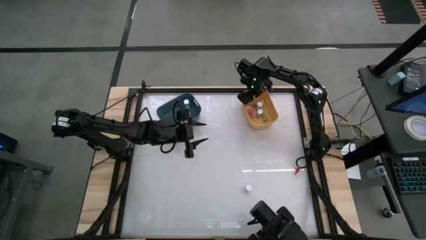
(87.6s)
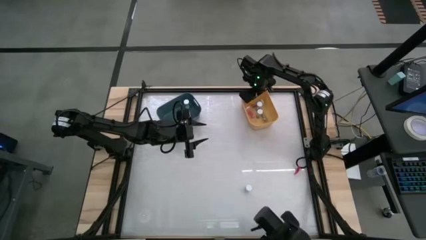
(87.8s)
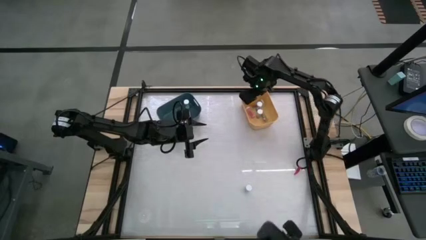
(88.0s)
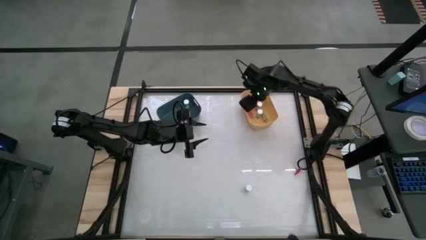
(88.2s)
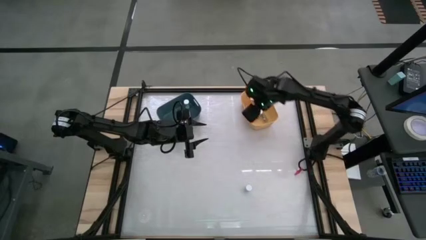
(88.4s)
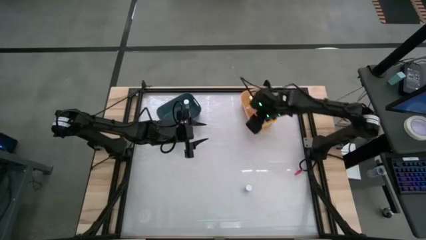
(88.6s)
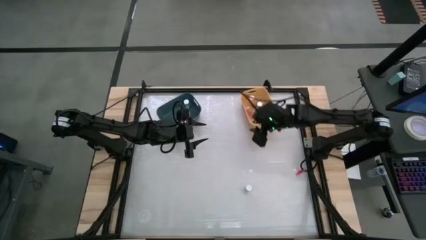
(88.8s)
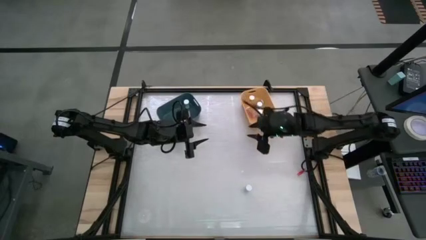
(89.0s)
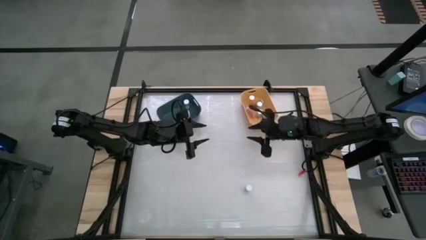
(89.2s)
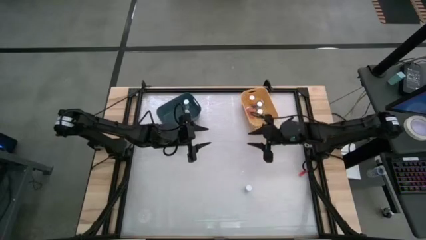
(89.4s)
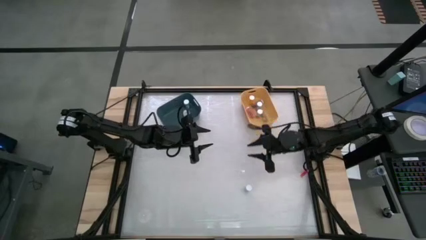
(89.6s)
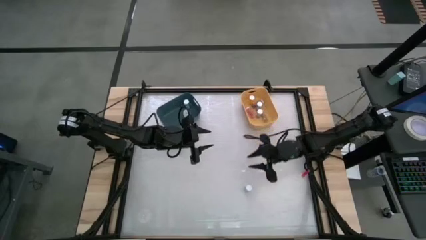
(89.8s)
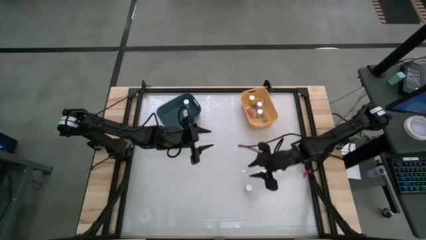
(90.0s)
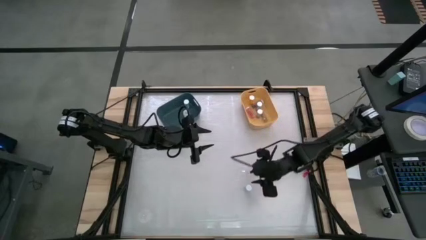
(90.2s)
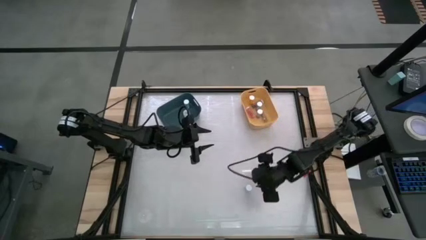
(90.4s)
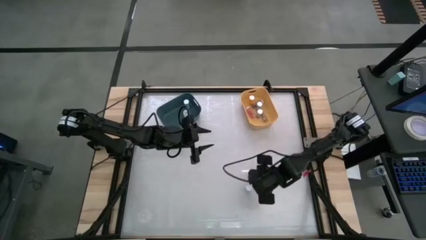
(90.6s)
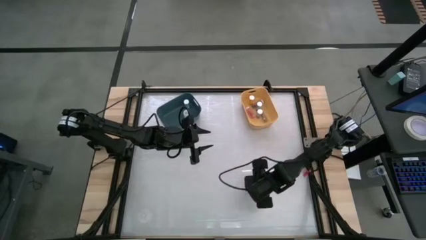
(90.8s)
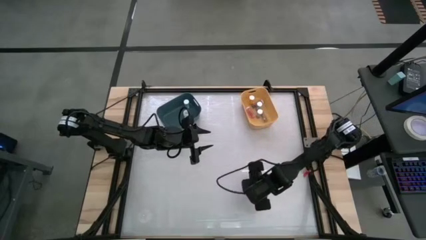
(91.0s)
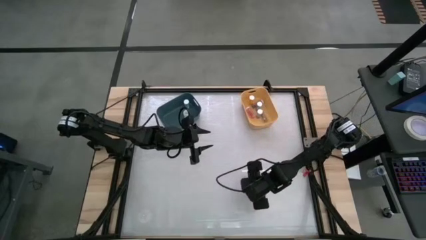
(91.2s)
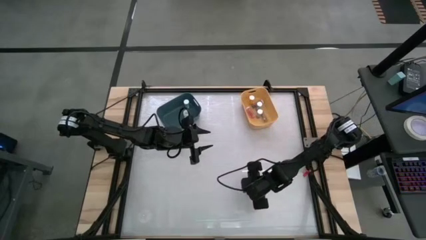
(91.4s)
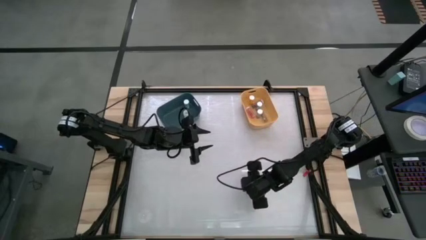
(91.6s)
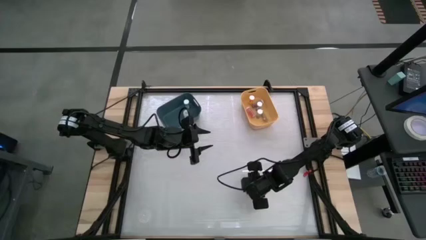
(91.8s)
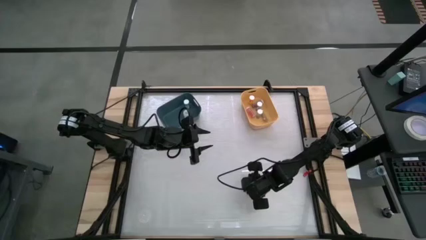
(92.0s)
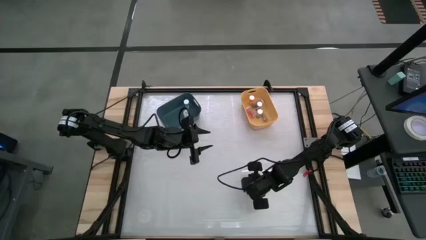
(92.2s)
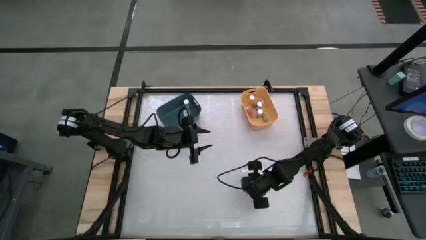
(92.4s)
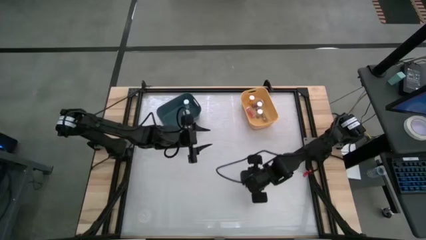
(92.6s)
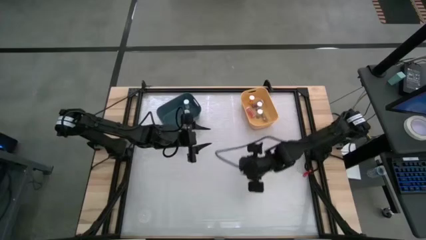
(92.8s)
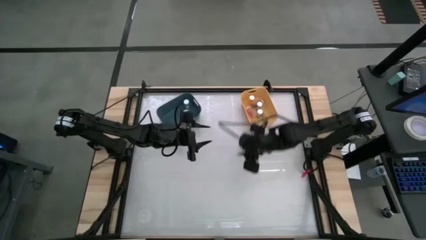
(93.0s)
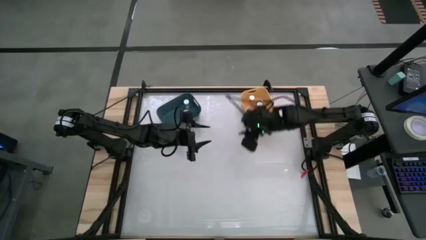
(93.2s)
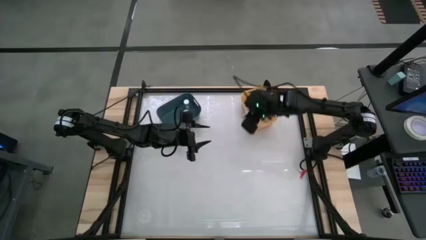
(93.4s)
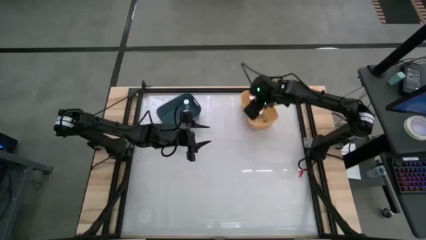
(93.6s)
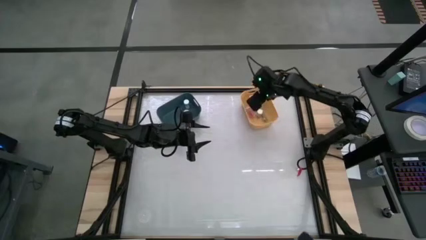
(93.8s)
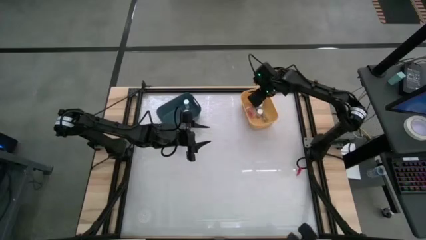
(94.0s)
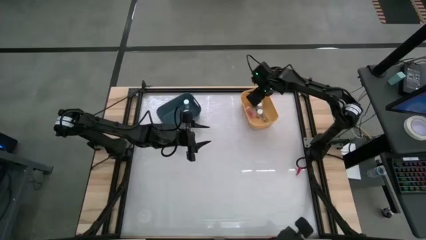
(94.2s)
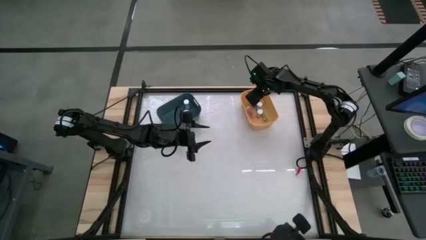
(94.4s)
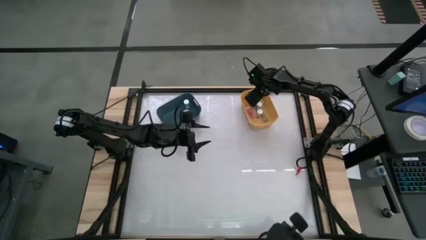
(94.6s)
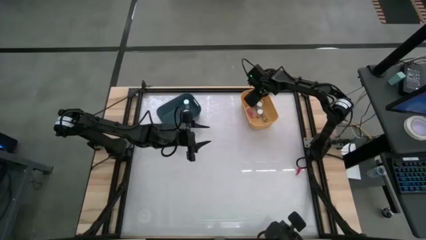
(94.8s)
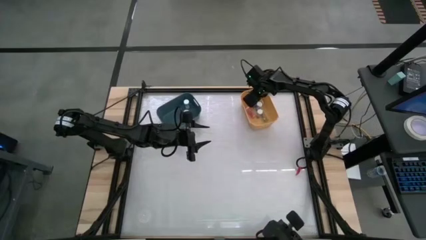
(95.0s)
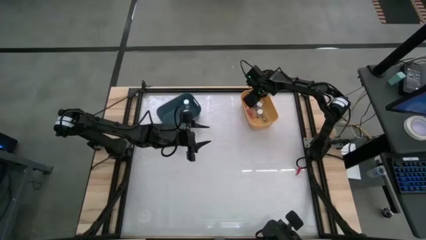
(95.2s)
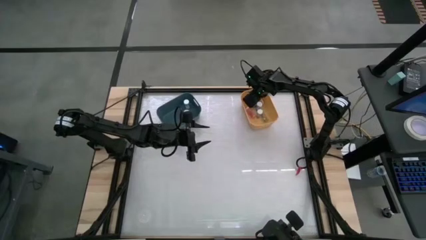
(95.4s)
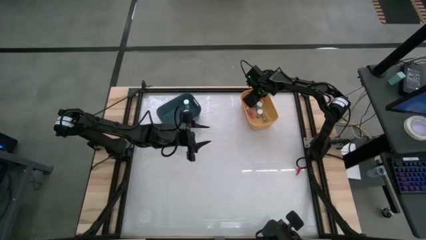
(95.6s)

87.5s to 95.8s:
Task: Pick and place medicine bottles into bin by pill shape (circle, oval)
Put the blue capsule bottle into the yellow bin

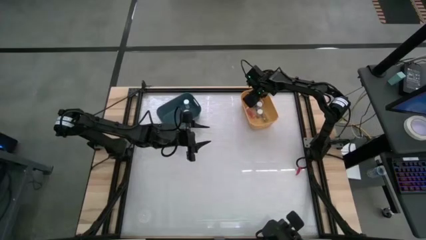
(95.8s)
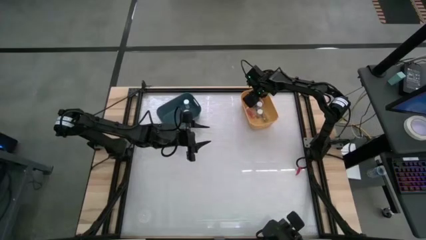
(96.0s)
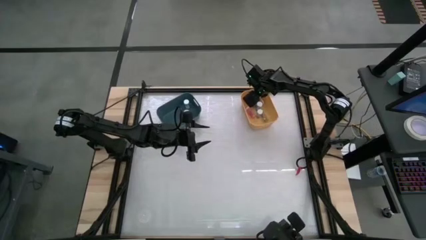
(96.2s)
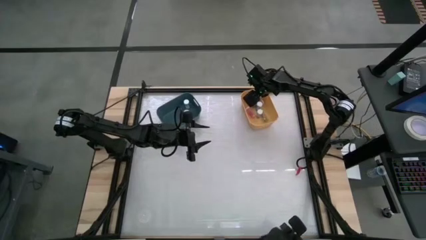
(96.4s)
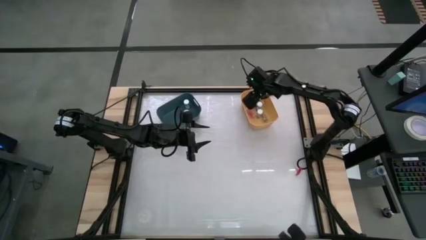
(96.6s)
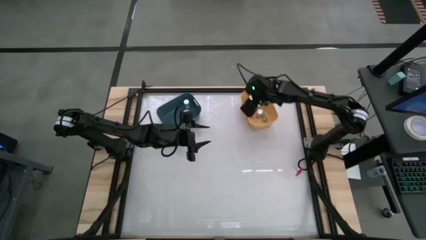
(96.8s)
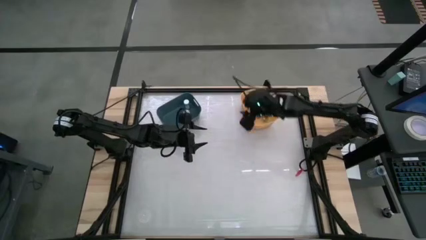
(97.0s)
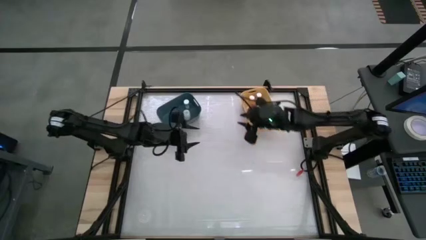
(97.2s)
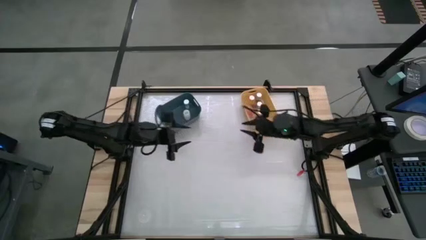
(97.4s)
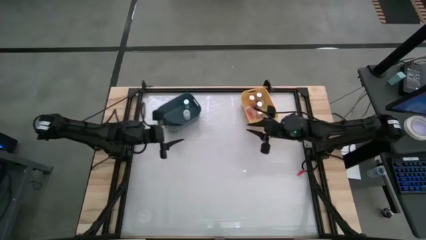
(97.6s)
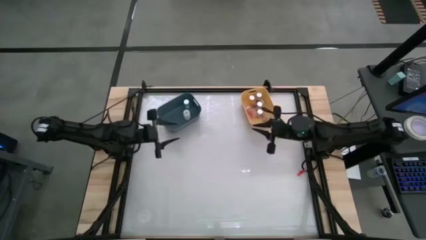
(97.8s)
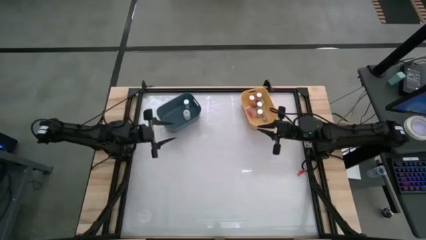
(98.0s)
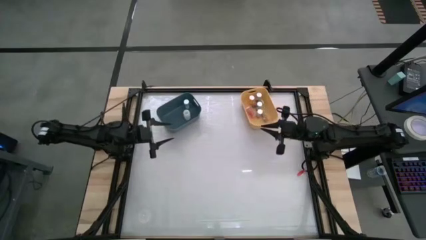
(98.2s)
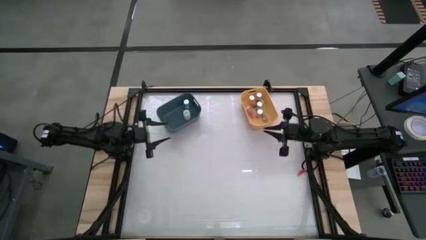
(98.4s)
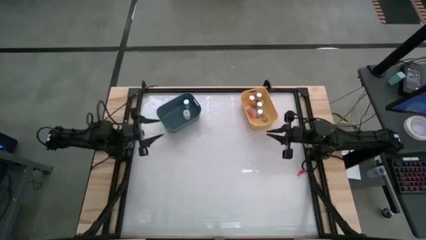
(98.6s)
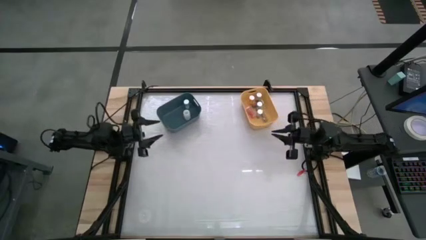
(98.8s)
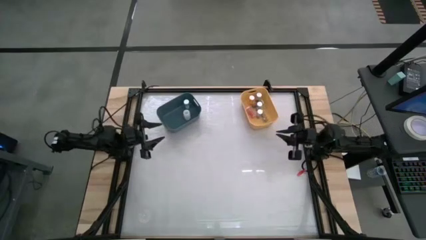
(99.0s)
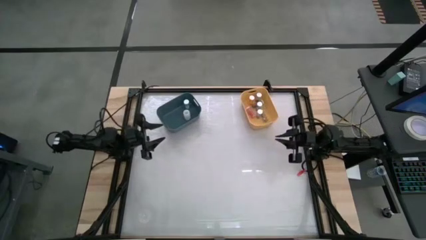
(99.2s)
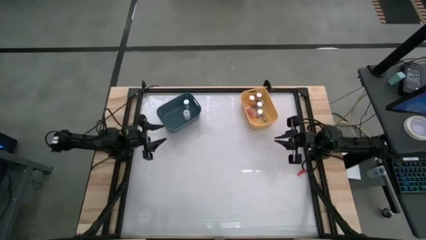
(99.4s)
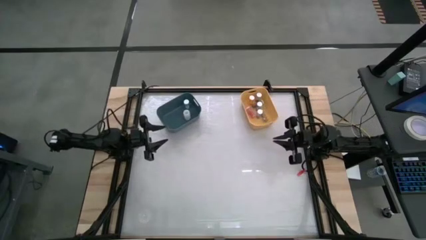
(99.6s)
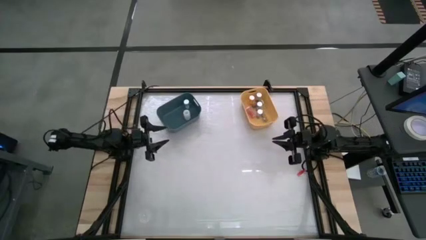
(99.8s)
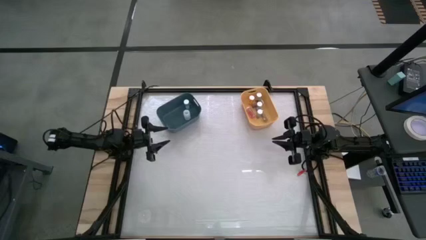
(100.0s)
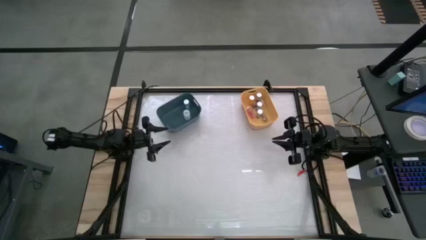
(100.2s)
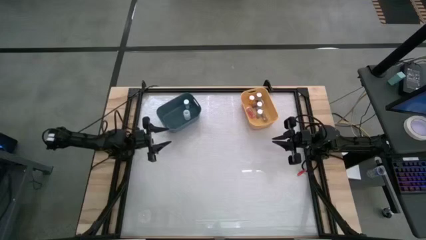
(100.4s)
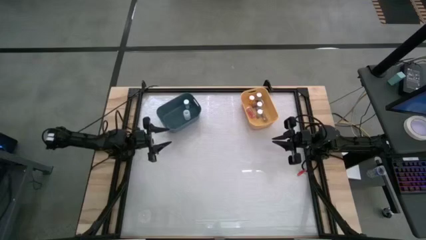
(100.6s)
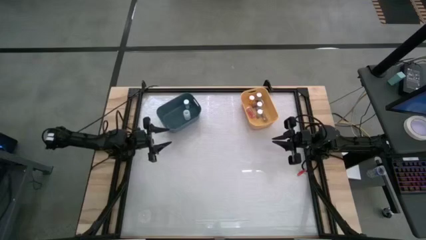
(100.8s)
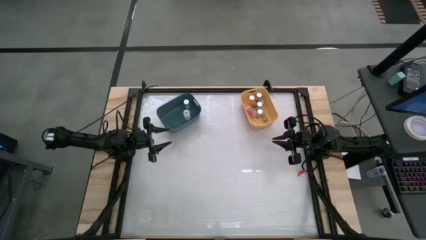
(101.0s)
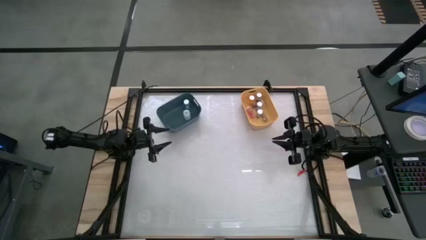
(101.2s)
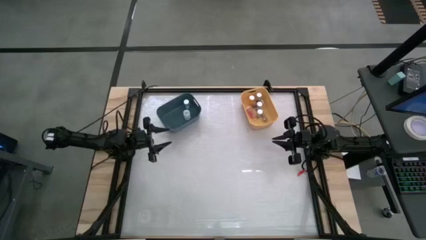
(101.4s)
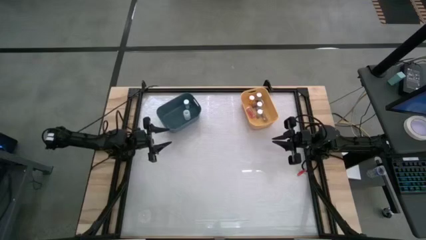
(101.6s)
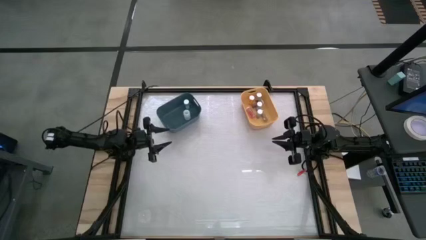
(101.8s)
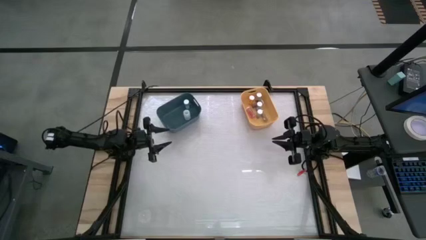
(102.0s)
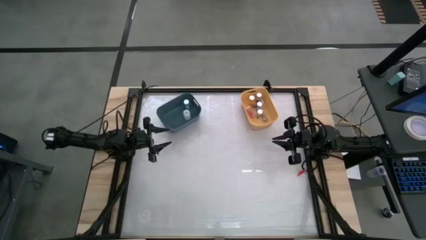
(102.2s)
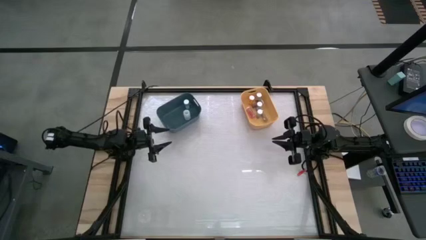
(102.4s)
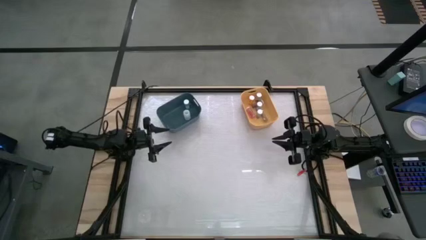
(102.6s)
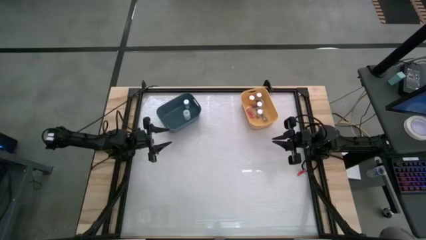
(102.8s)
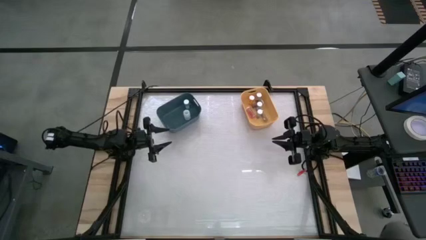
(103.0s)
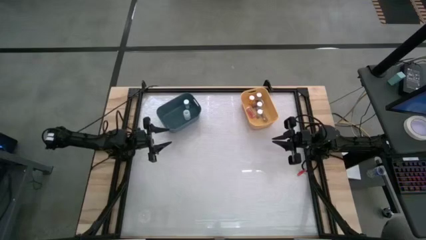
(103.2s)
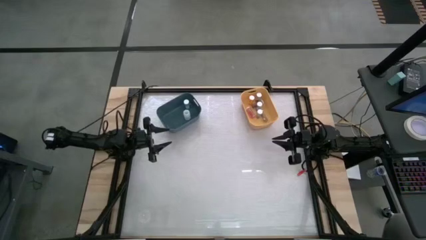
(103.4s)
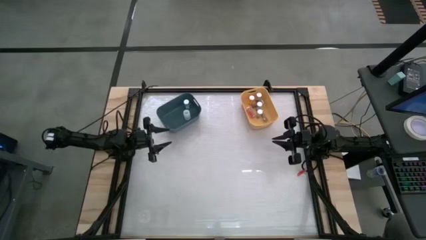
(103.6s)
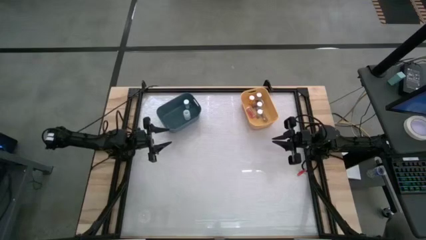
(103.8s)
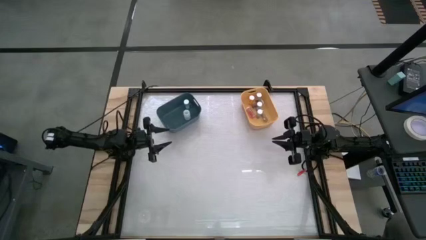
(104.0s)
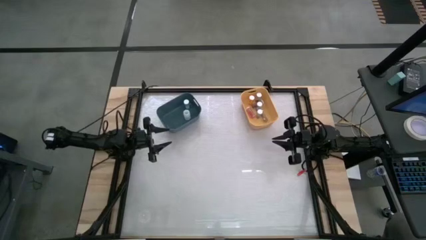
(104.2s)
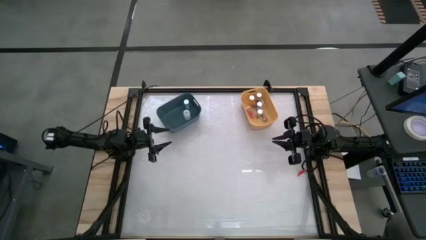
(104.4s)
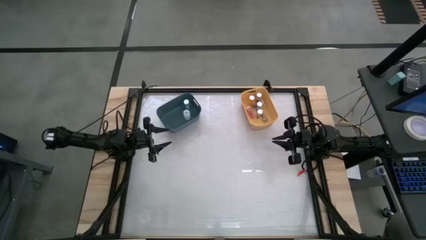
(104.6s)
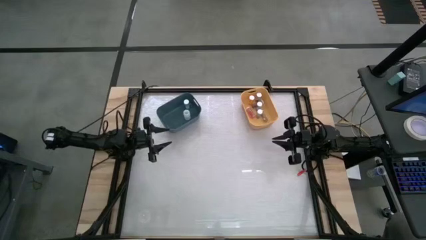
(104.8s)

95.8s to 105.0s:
Return to Home Position
